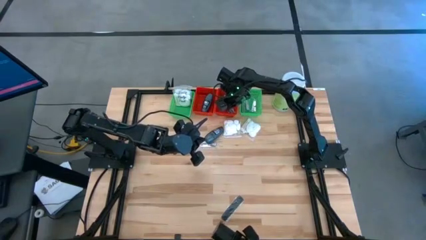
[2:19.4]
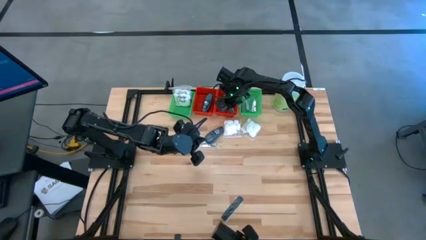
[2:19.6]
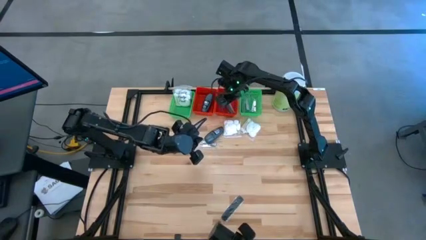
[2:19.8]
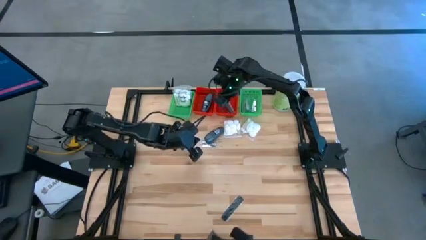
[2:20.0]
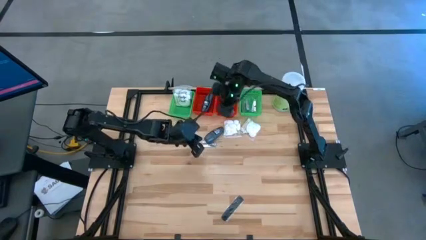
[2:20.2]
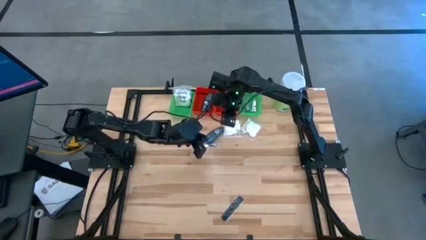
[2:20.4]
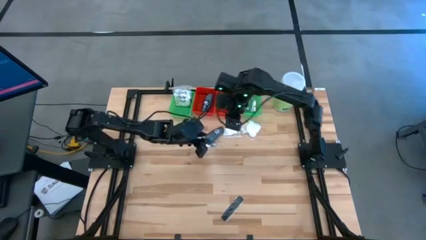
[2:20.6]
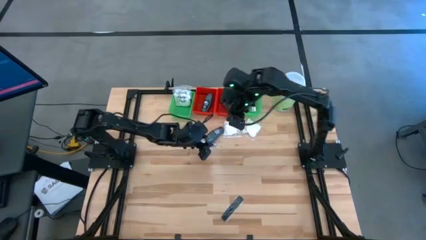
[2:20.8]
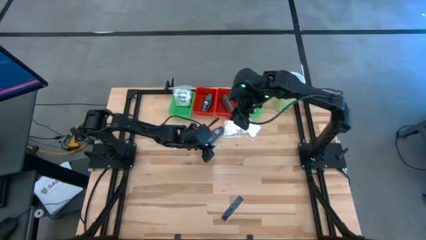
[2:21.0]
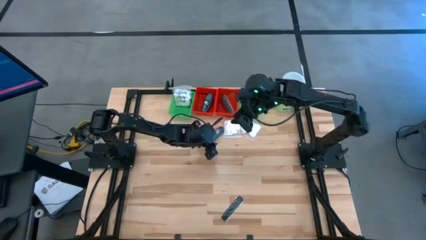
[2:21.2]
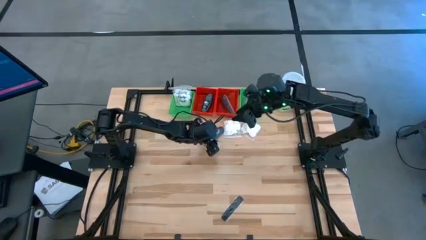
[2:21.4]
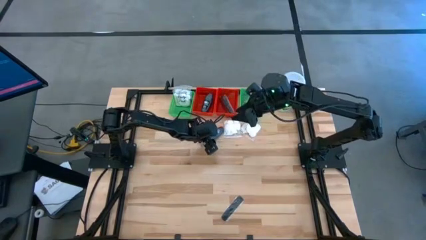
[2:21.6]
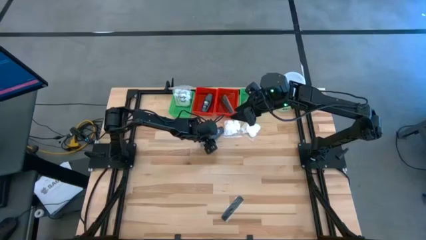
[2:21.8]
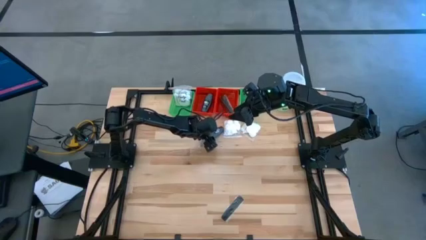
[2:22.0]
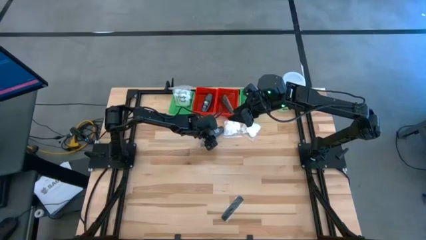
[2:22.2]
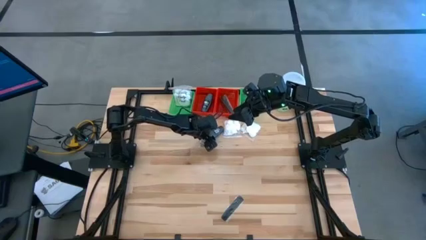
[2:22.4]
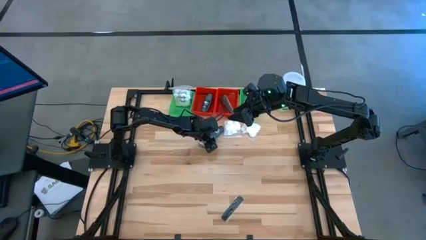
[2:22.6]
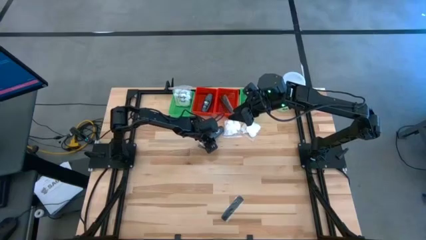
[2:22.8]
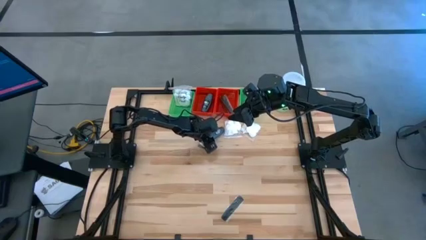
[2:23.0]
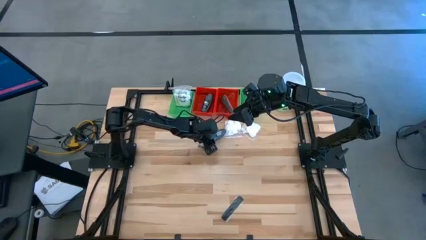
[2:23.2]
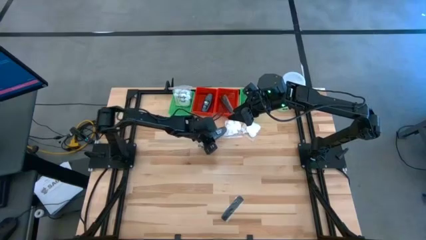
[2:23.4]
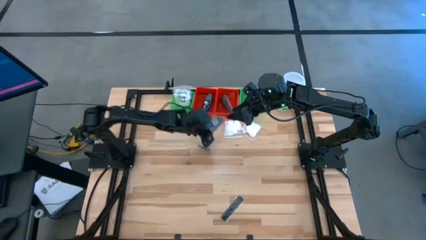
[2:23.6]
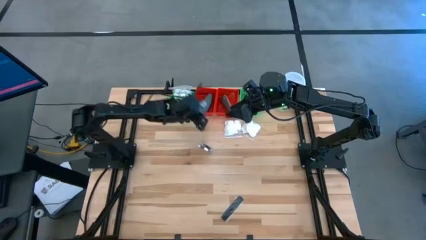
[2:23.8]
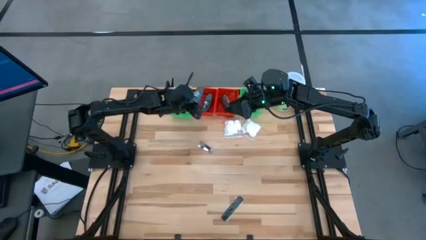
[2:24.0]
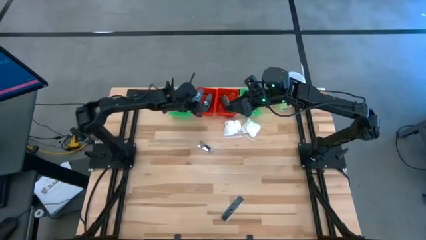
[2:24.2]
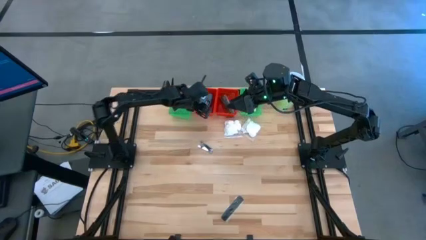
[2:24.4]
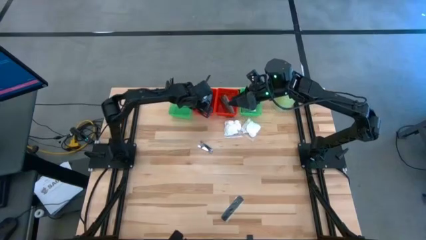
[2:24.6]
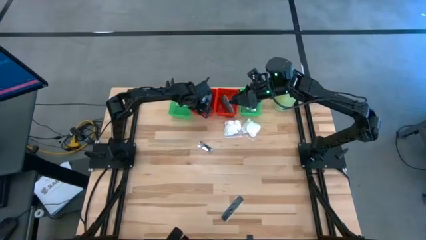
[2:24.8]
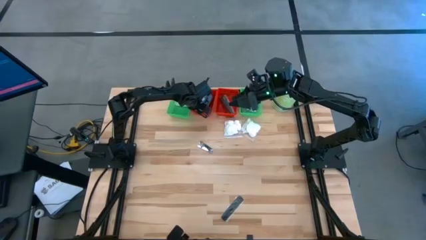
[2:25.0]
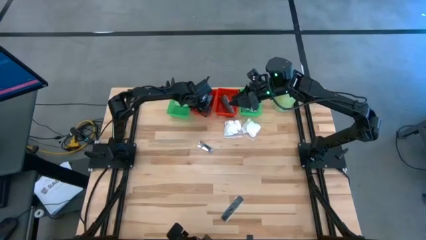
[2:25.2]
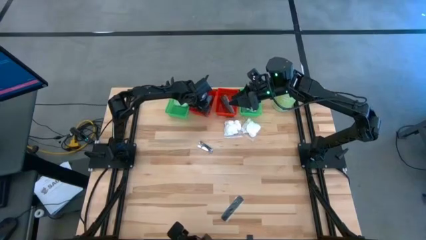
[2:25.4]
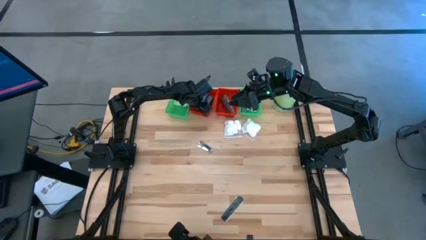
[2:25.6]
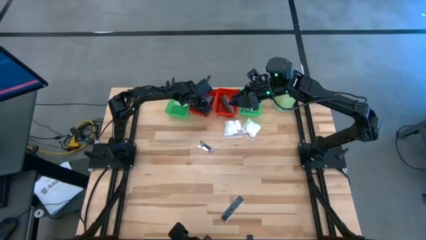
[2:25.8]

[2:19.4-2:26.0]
Task: Pick & Place Travel size toiletries
Put the deodorant into the left red basket

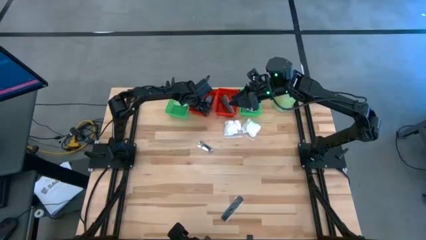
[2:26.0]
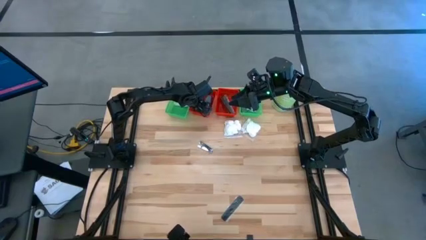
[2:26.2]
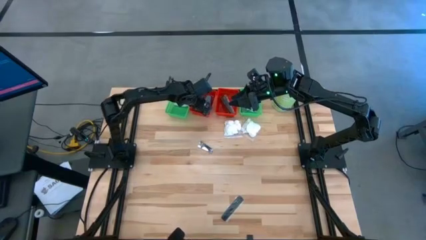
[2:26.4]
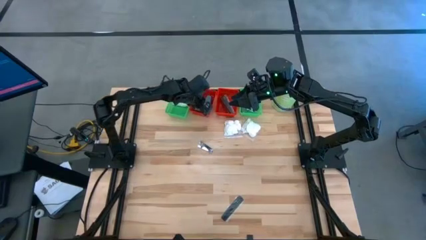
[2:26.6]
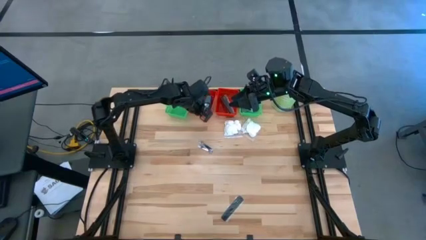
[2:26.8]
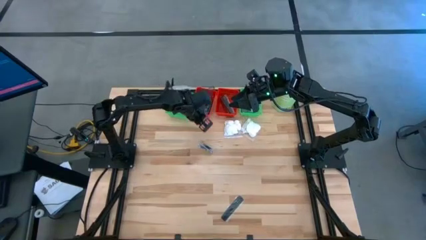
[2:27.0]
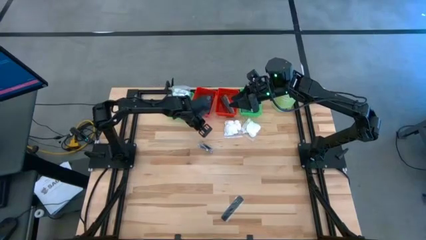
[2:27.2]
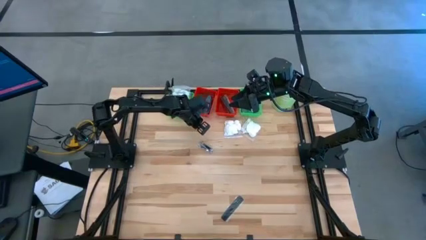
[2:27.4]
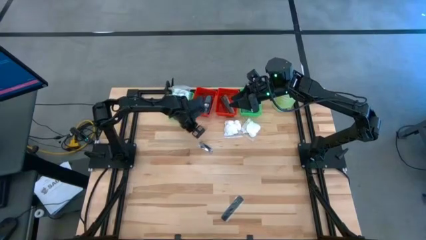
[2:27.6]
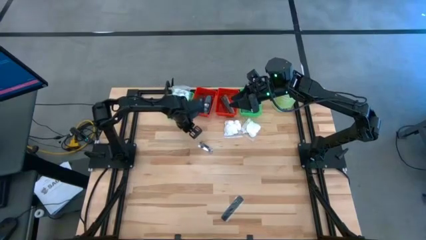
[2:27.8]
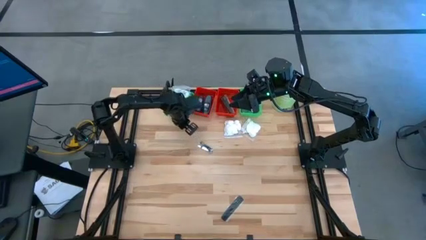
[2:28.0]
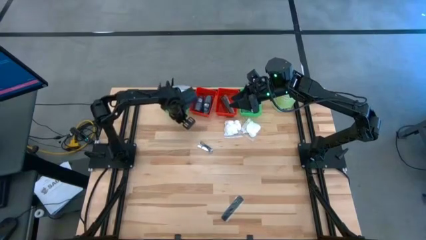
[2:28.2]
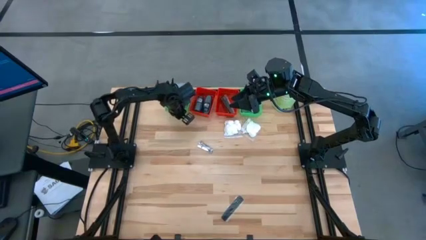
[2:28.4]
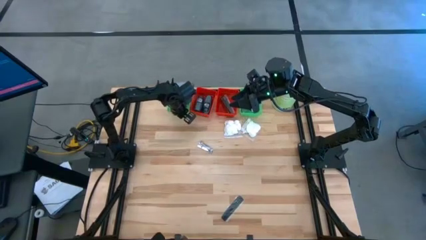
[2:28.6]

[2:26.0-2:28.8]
Adjust the left green basket

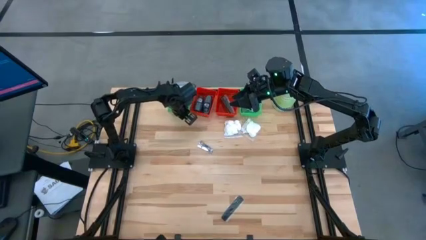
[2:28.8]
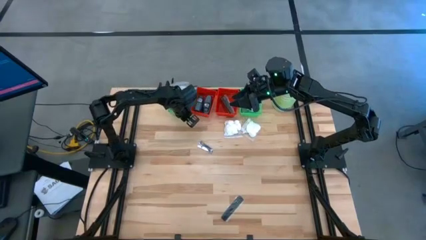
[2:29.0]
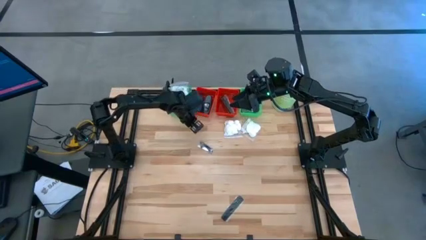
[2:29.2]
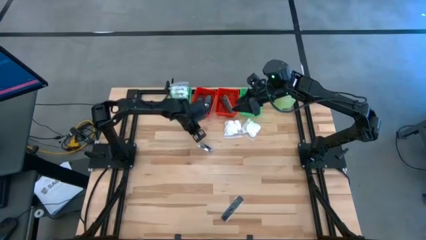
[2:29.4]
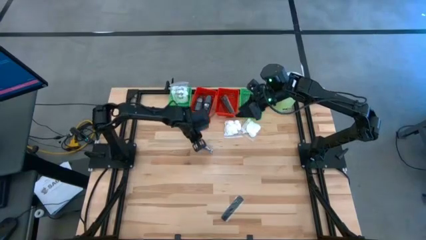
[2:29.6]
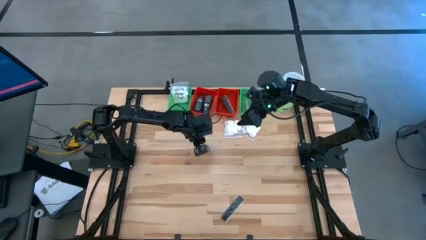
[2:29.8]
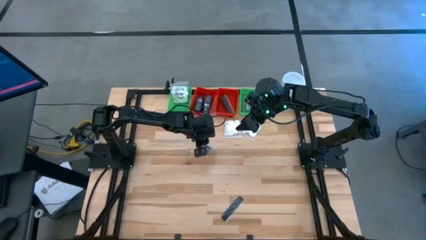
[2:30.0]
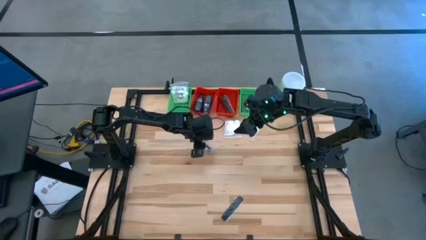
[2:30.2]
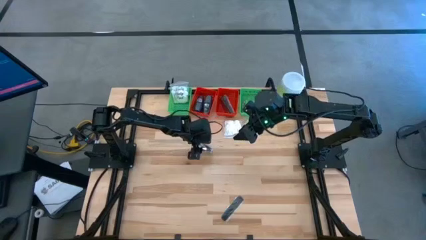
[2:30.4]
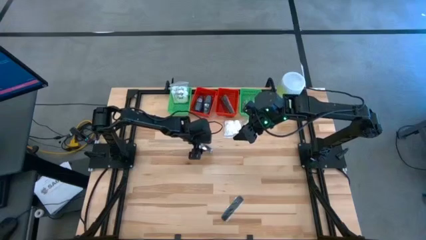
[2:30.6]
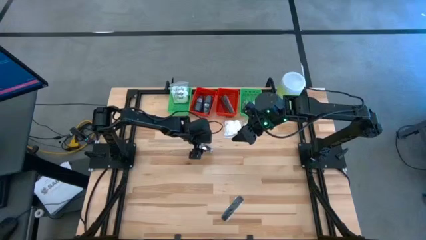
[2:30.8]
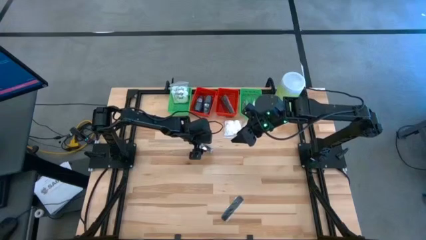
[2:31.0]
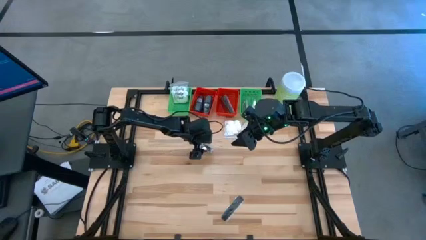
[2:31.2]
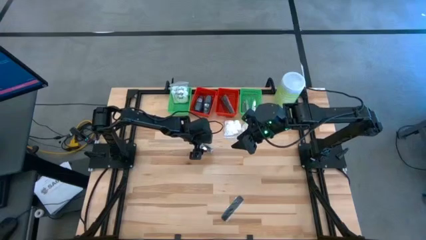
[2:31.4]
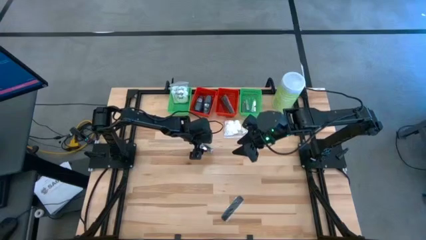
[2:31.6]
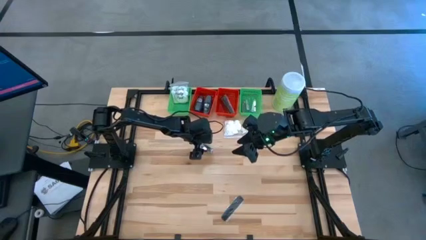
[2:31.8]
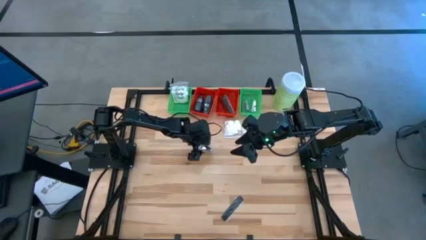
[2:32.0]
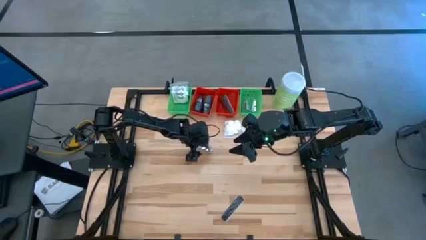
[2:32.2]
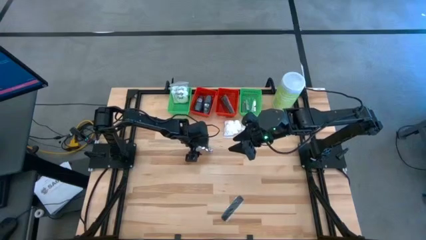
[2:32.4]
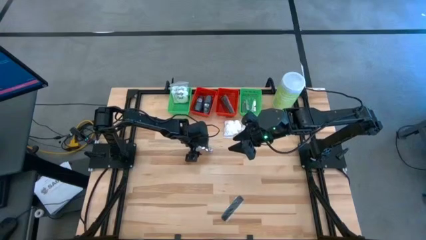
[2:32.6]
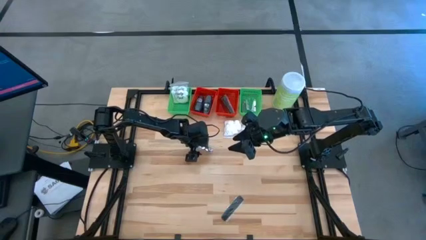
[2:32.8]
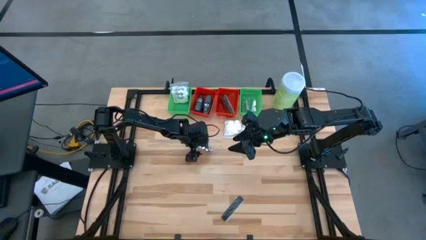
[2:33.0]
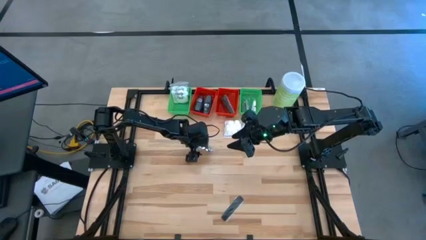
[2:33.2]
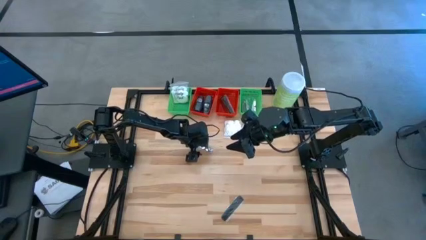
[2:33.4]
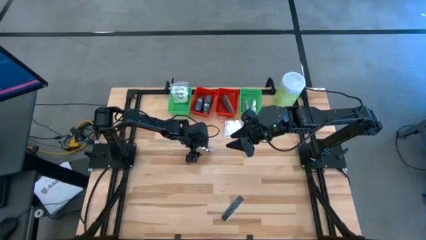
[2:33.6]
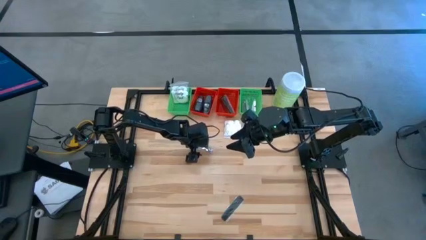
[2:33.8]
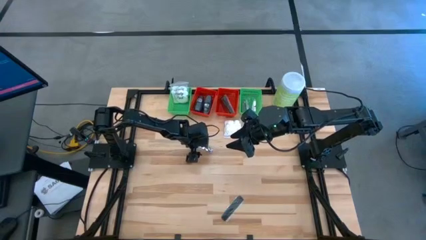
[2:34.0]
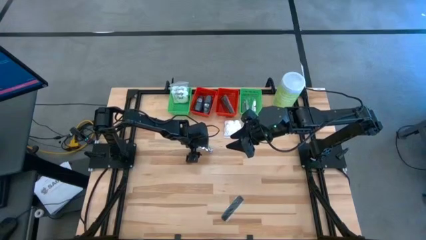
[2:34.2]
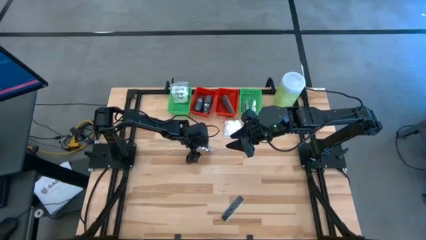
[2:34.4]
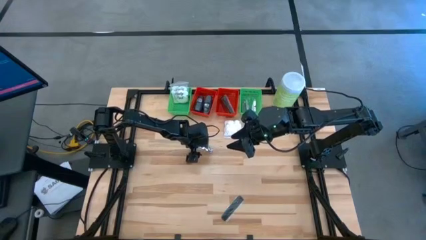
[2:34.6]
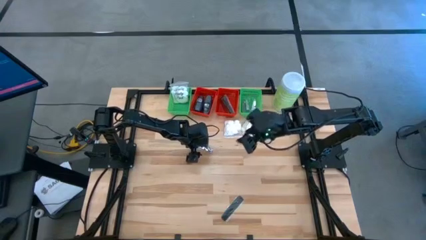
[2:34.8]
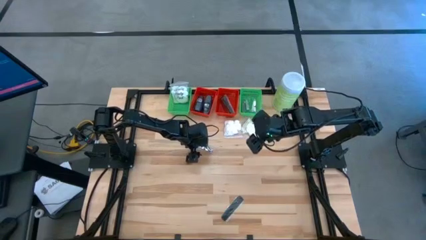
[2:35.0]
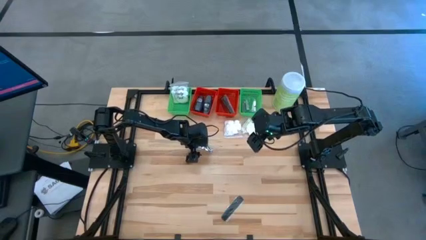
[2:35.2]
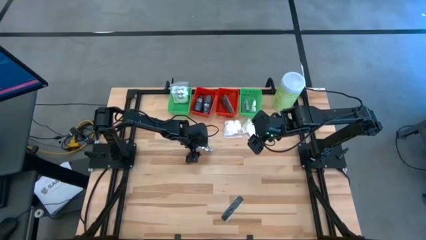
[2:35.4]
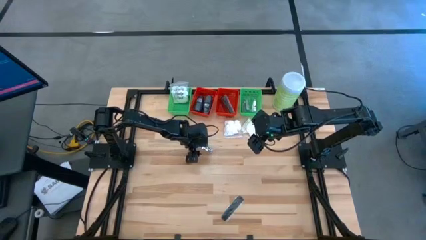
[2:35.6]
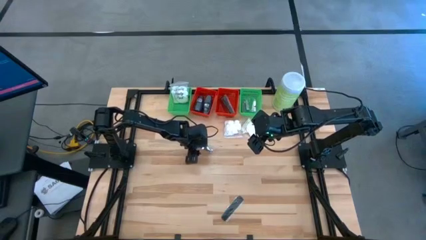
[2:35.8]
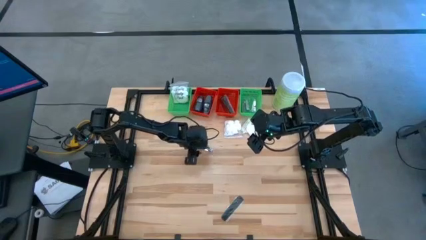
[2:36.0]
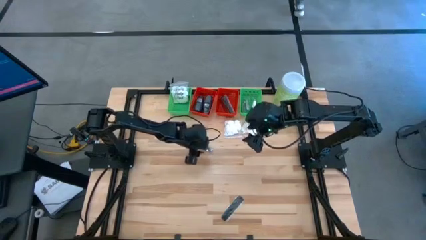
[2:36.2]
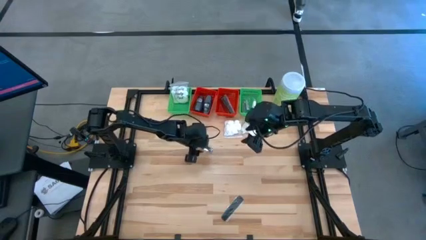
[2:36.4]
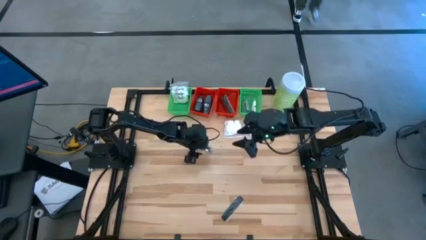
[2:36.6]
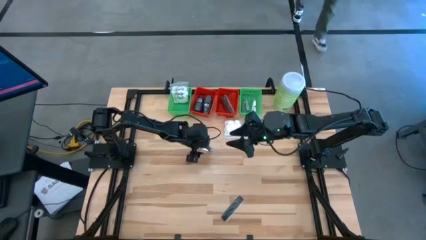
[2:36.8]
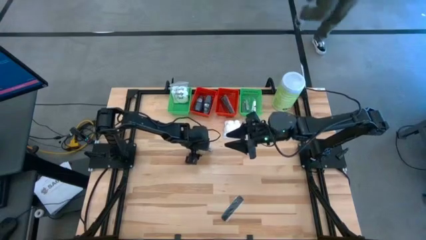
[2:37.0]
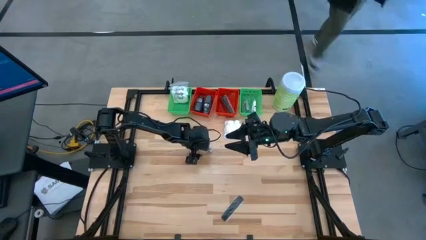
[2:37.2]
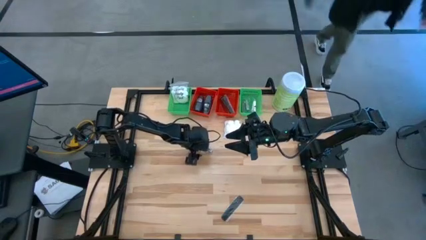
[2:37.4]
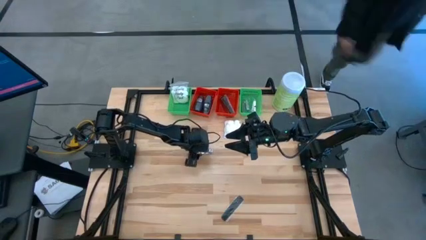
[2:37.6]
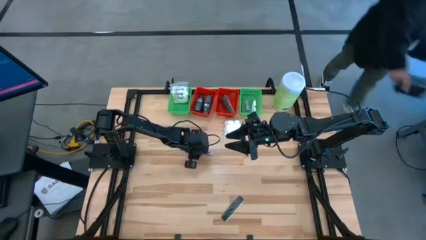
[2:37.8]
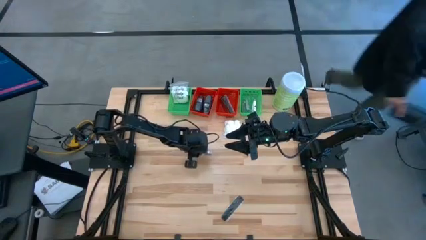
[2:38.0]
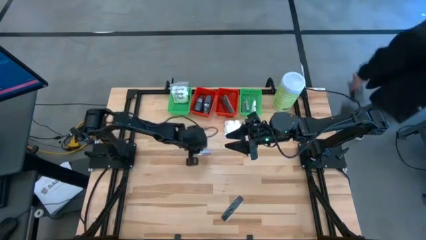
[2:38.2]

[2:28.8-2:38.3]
Put the nail cutter into the right green basket
